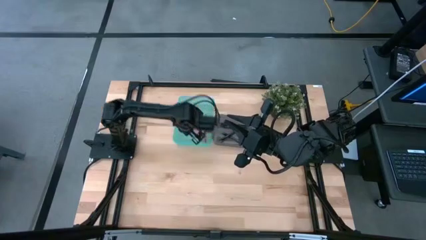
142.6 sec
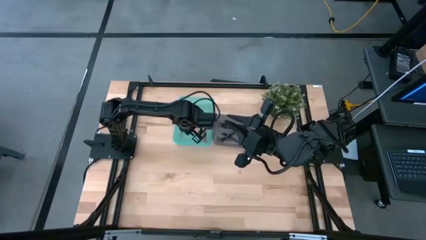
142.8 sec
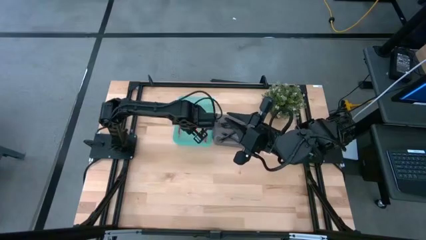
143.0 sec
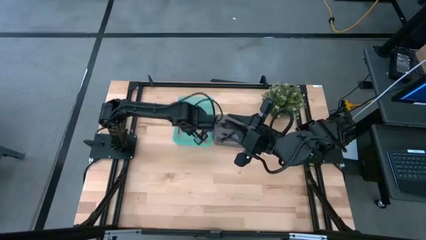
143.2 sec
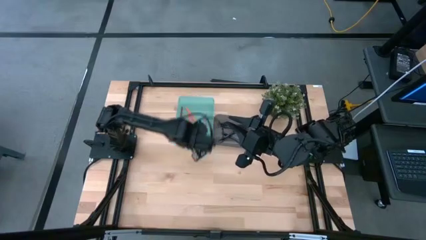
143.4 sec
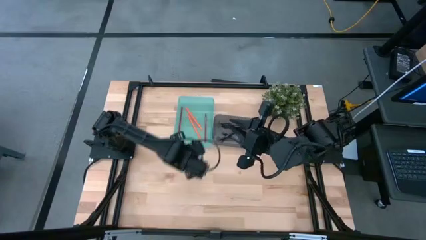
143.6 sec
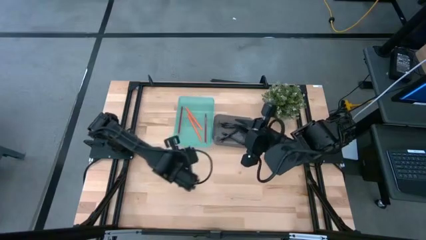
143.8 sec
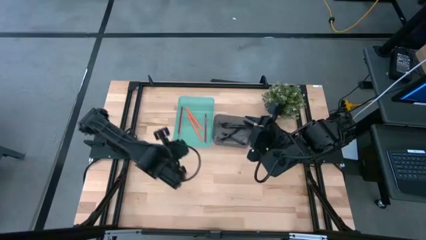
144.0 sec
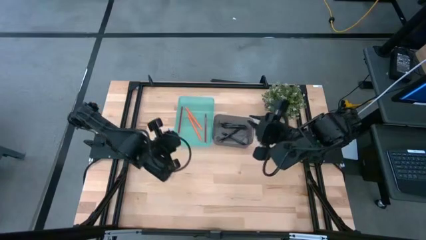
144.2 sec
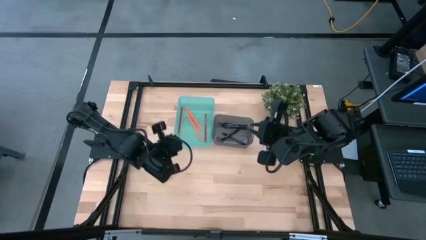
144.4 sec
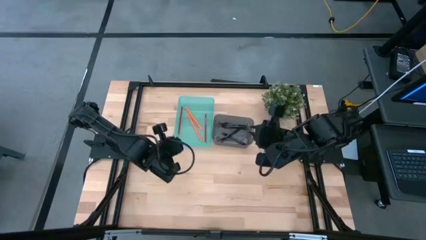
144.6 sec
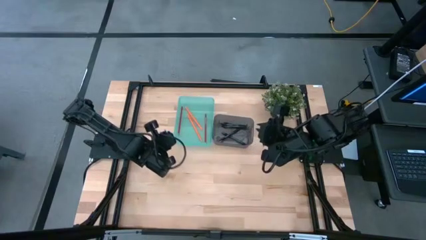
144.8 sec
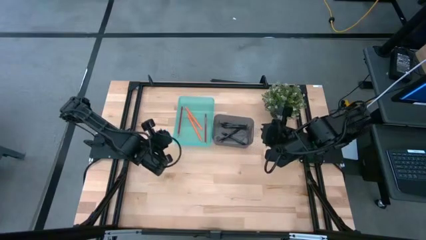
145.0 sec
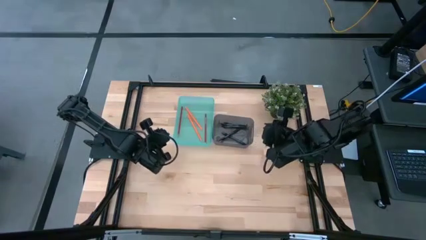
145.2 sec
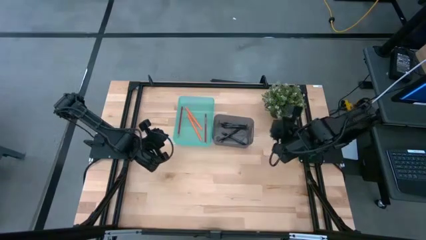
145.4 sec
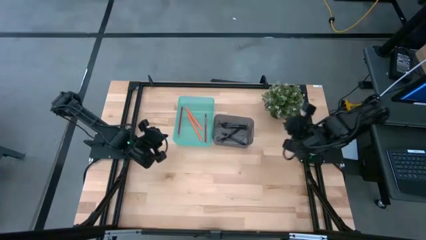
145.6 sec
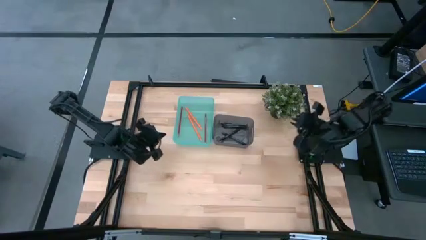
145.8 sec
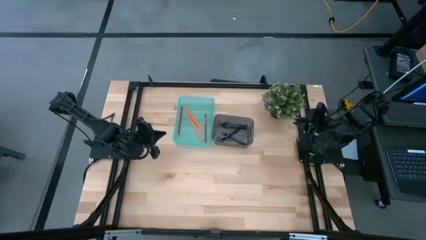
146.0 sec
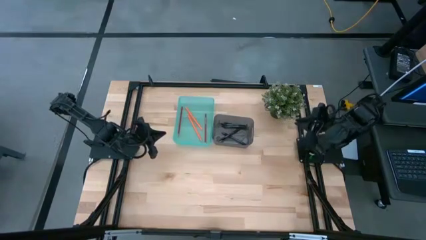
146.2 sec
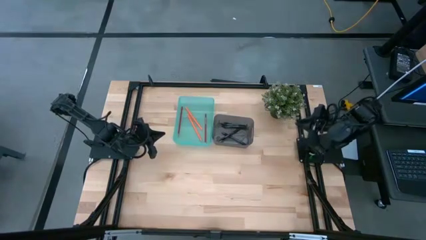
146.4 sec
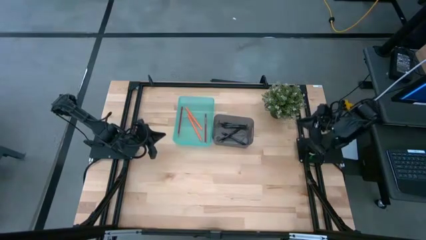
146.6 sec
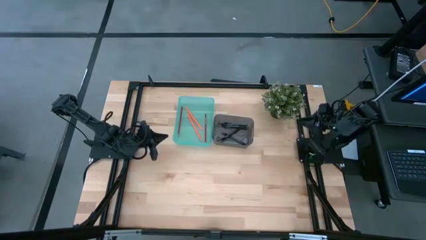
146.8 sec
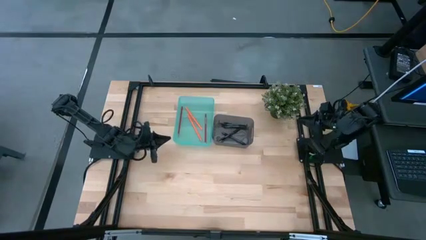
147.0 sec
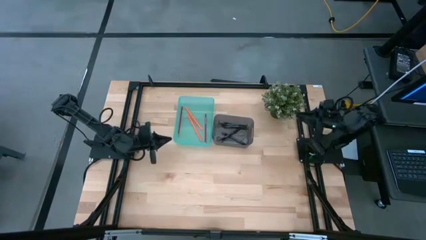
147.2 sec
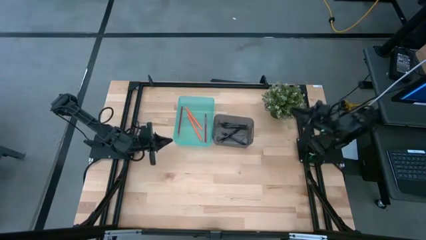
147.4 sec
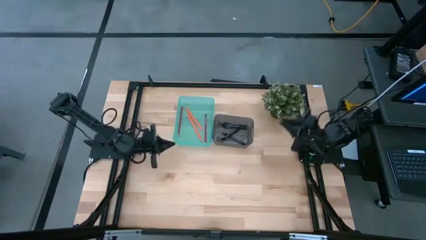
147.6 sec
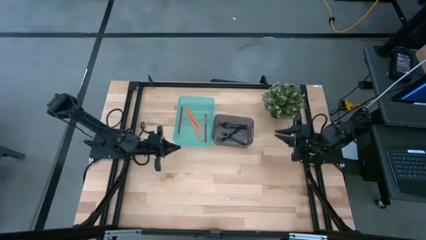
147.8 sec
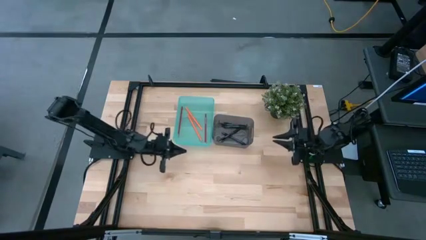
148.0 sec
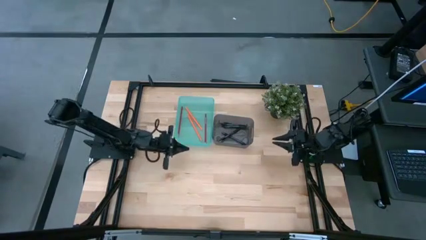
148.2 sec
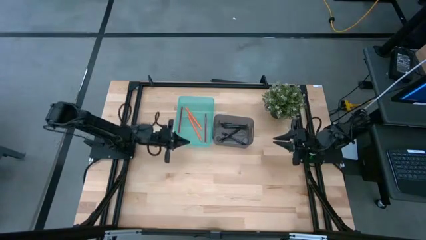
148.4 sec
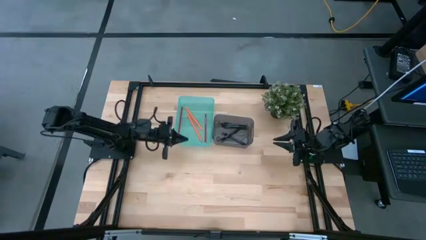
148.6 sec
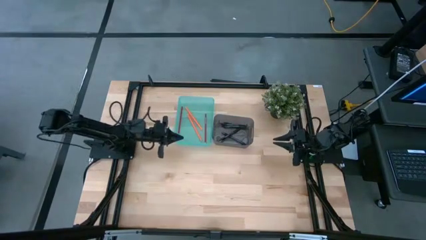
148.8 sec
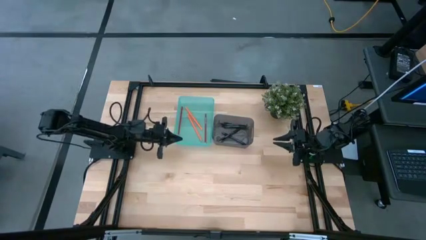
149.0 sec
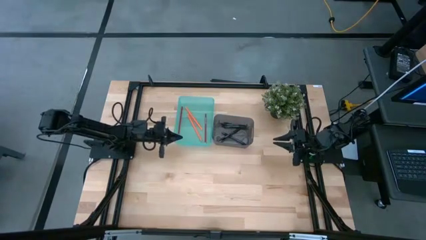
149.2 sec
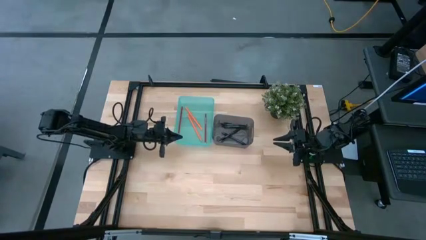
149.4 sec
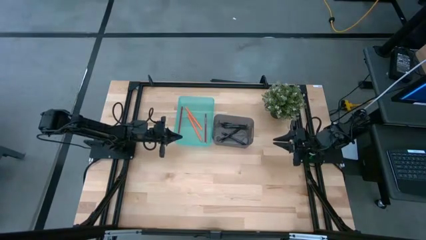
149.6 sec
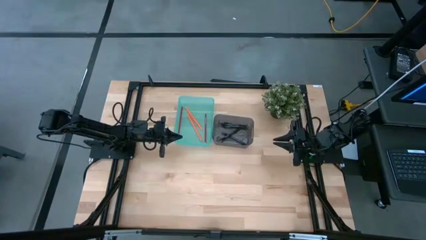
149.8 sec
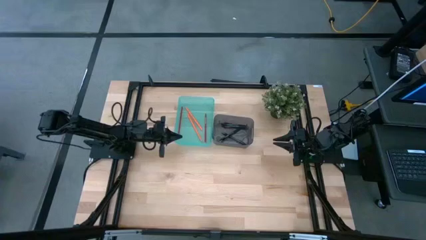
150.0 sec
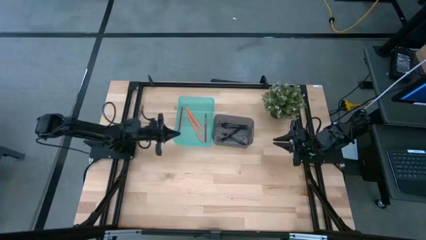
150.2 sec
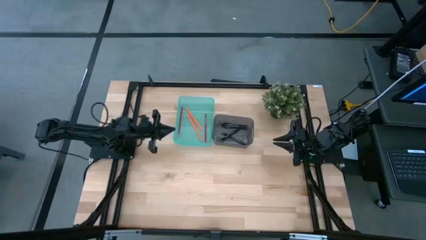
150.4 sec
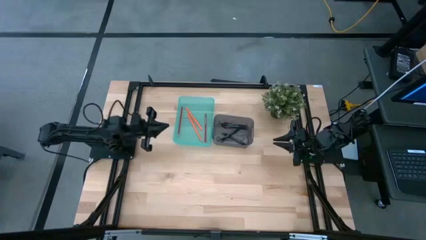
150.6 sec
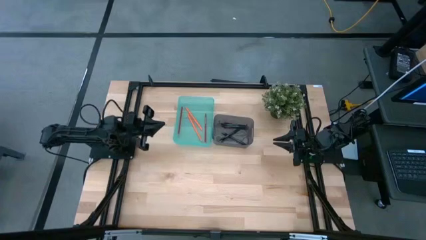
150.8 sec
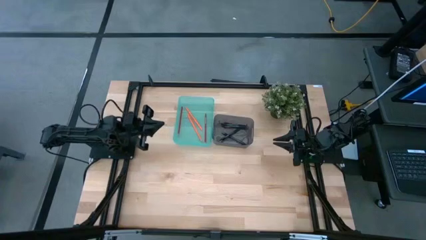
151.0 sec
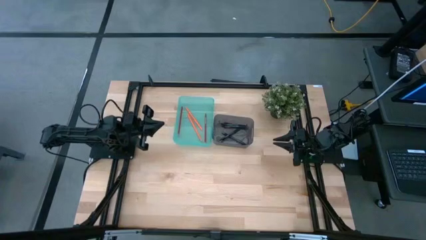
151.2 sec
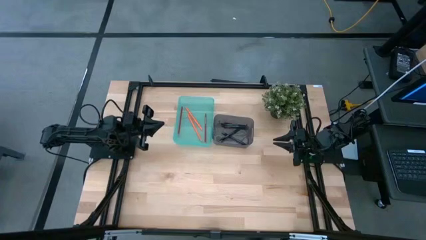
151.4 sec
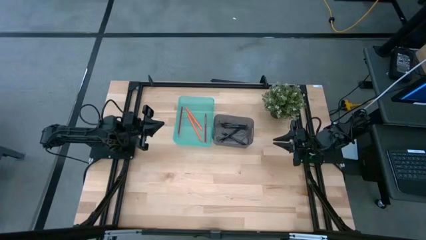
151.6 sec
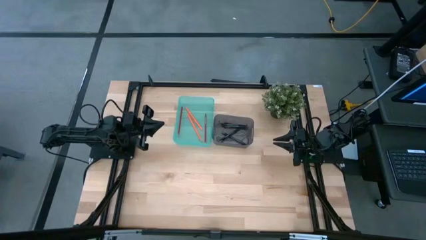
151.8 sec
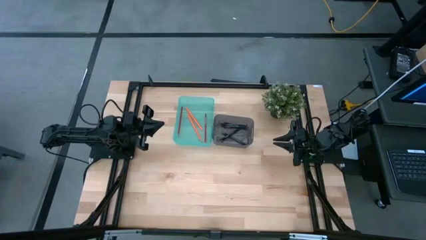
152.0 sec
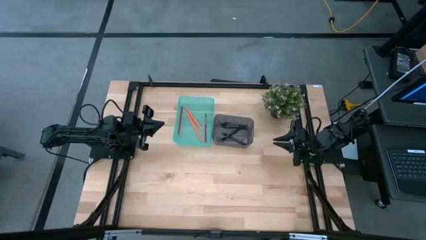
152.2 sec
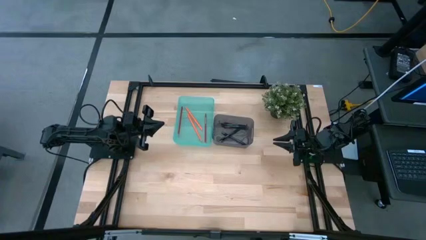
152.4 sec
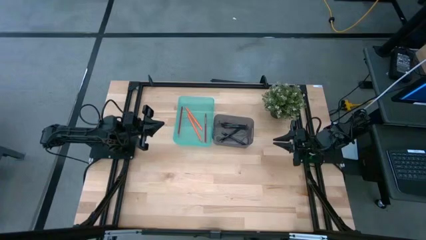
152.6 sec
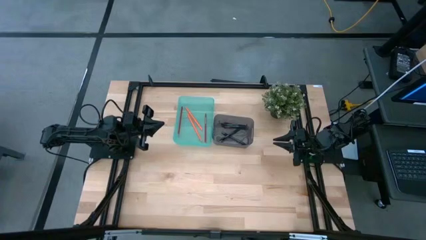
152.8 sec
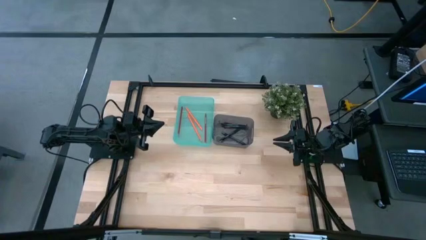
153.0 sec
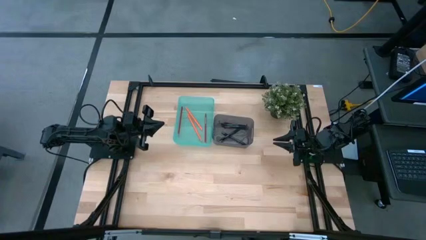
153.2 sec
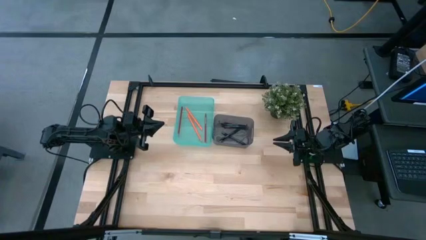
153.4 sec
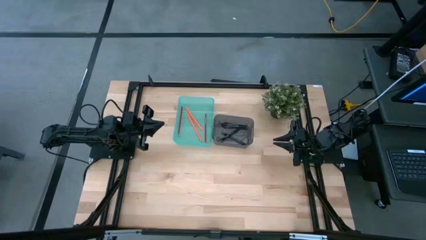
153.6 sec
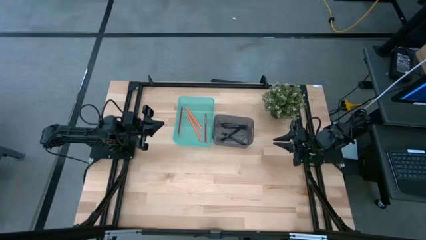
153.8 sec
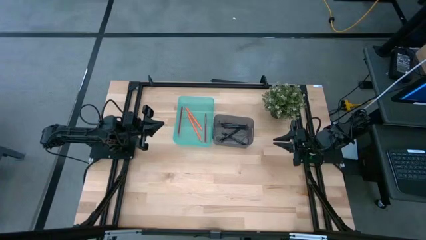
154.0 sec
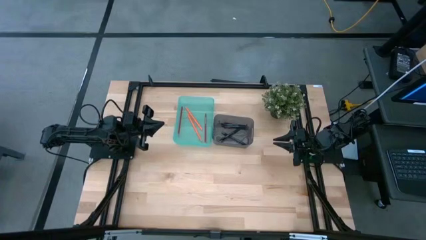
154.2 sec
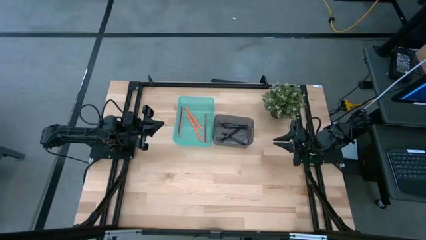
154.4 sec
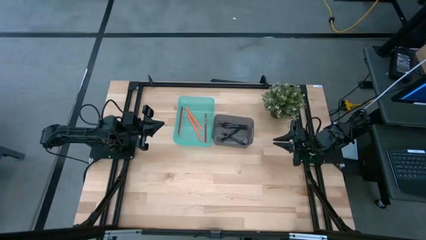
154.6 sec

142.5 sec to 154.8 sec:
Task: Sort pens & pencils
Return to Home Position

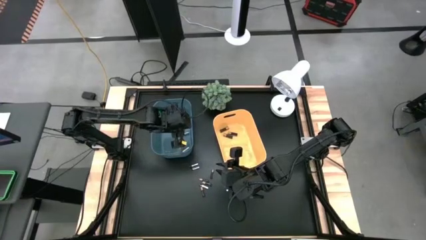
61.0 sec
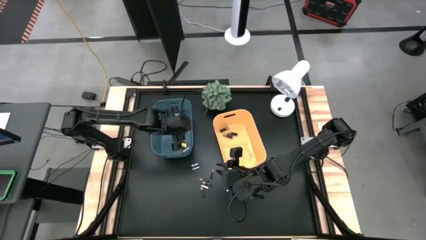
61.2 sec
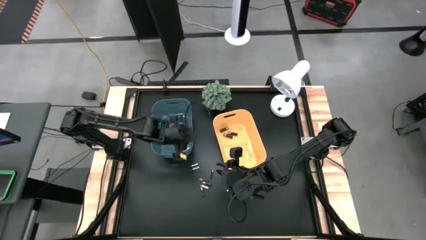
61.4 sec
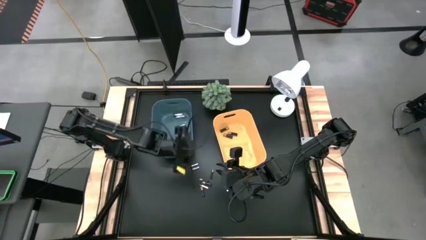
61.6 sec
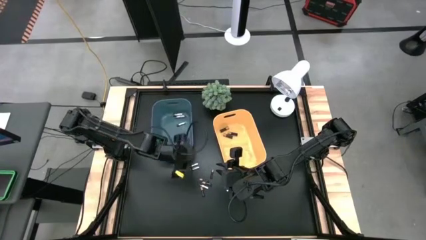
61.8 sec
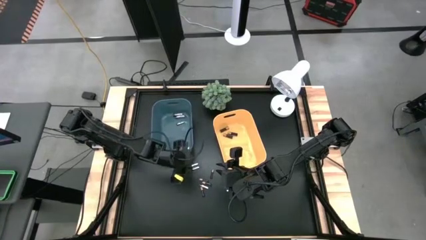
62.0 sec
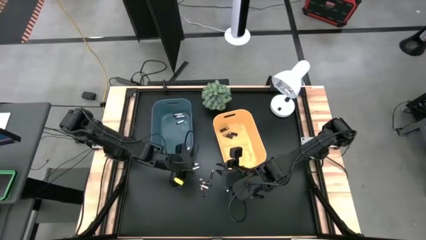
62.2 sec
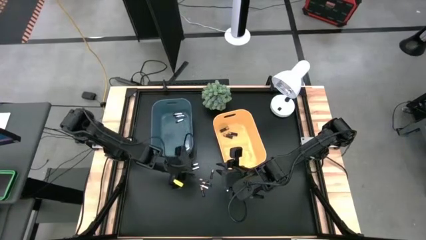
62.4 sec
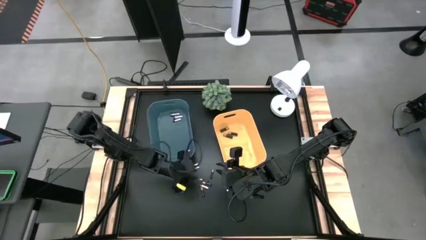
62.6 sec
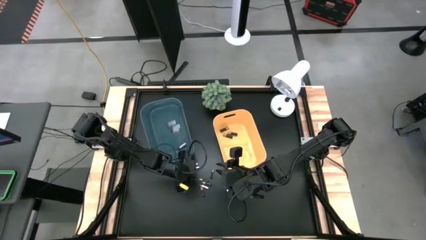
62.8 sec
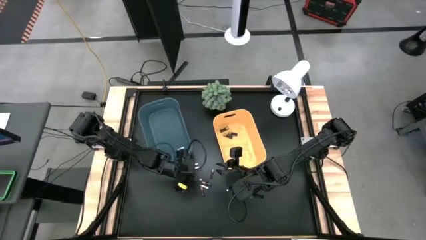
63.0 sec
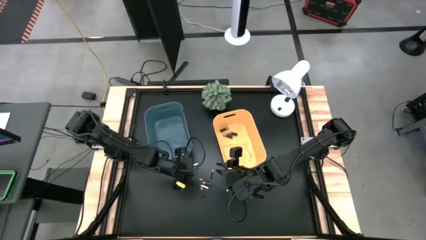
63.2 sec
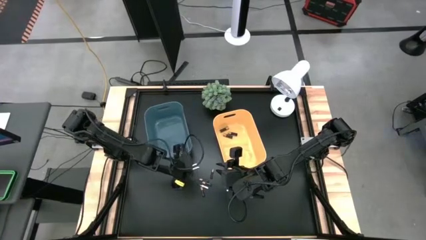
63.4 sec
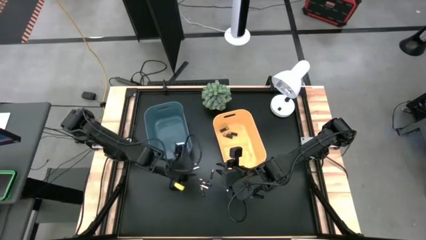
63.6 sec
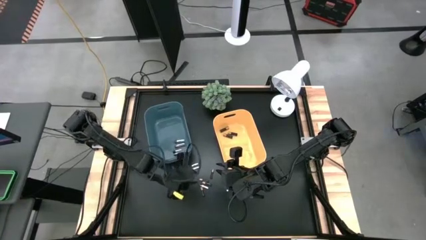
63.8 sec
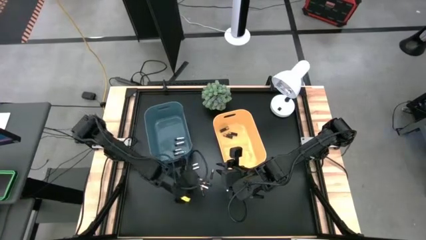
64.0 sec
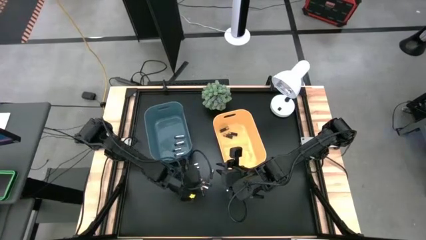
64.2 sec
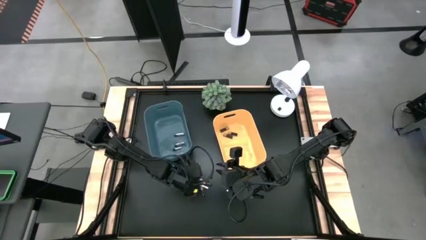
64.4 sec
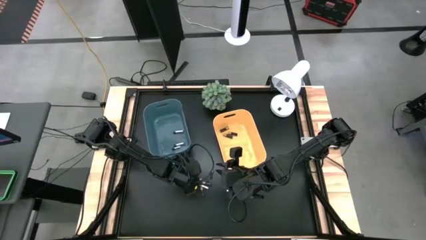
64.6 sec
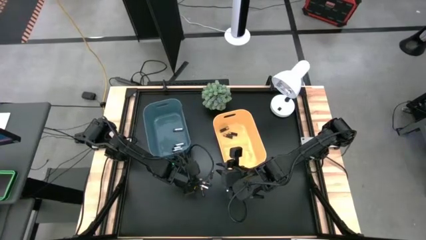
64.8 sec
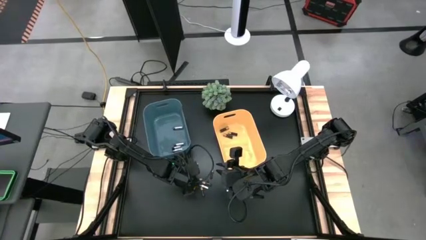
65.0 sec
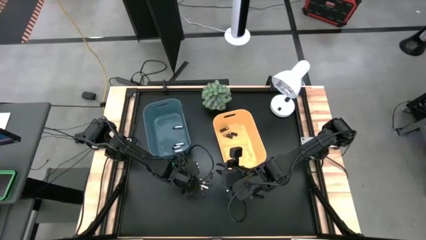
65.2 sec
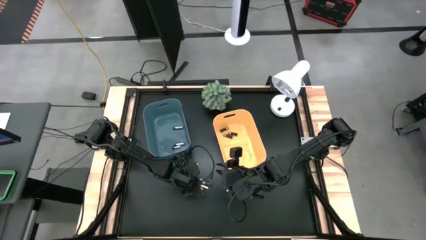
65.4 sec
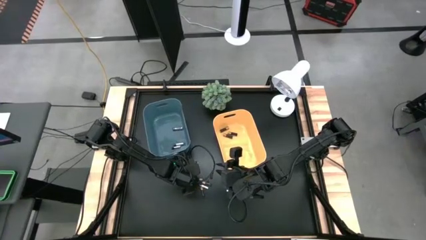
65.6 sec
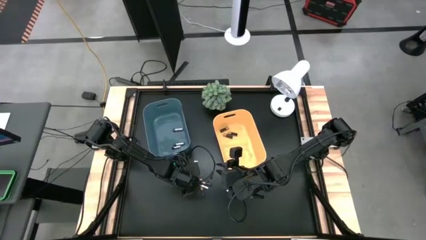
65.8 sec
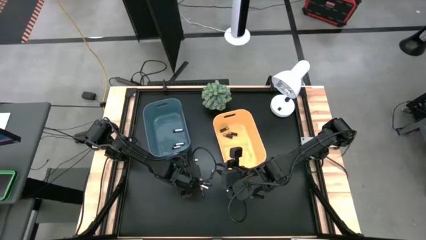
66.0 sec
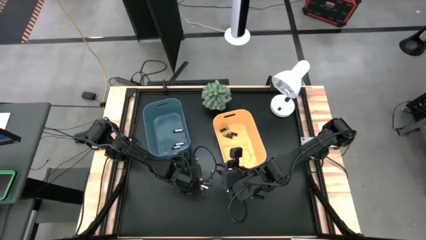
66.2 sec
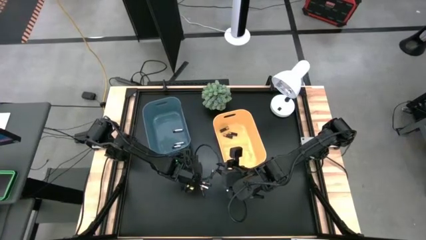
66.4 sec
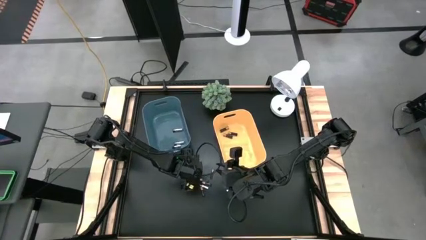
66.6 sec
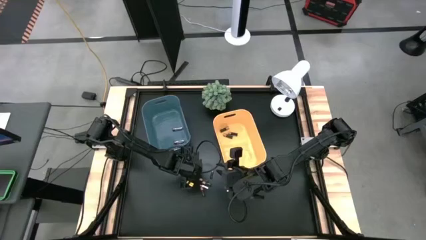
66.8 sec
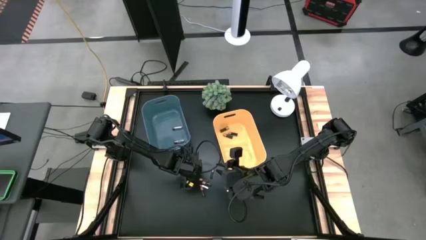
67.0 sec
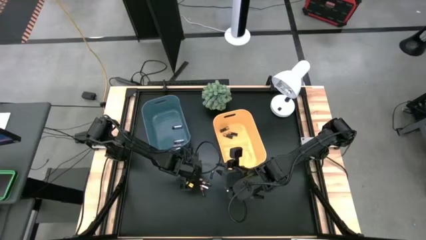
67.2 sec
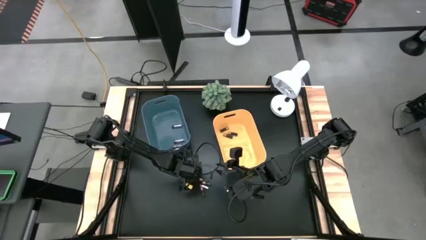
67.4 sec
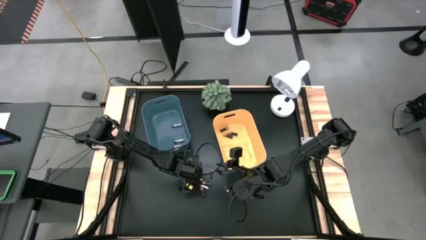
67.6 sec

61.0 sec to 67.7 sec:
Task: Sort batteries
Put the silver battery into the blue bin
